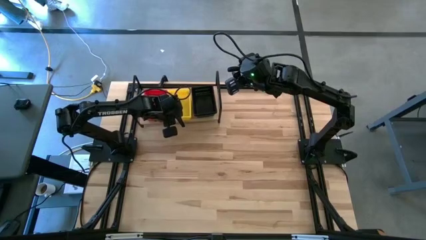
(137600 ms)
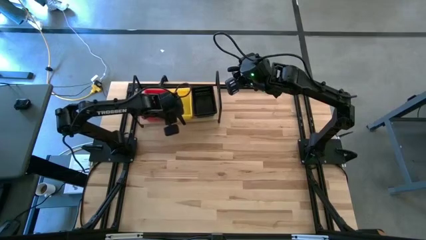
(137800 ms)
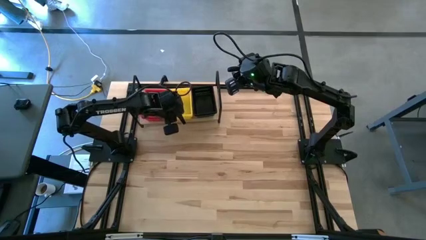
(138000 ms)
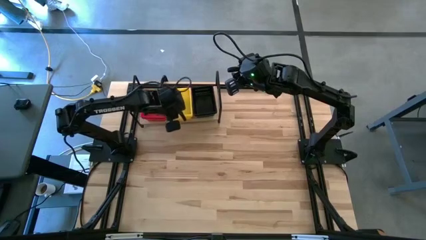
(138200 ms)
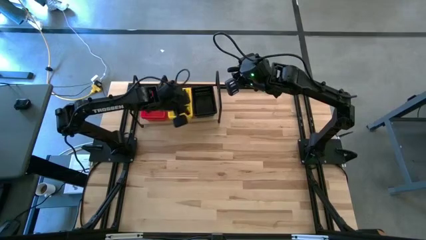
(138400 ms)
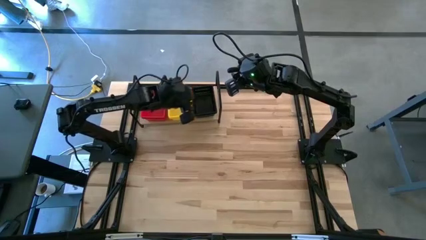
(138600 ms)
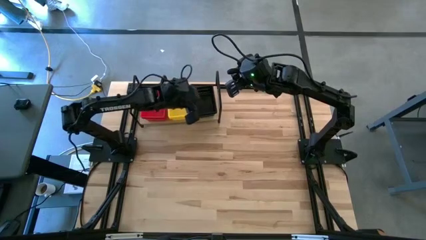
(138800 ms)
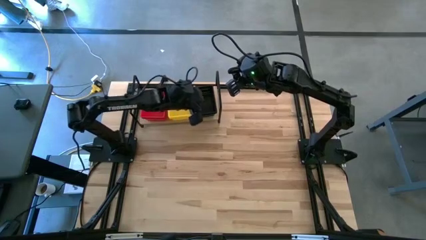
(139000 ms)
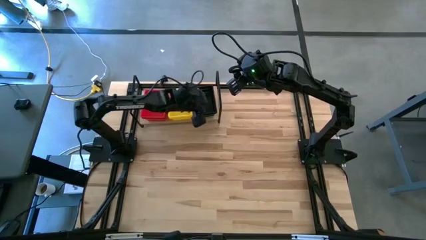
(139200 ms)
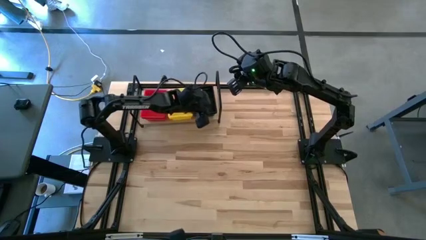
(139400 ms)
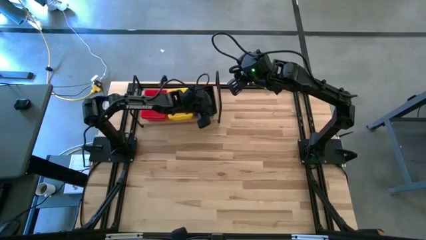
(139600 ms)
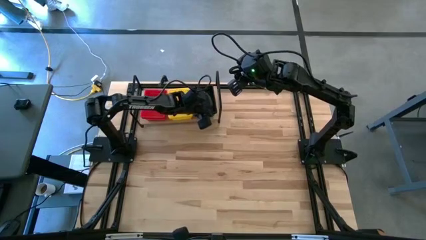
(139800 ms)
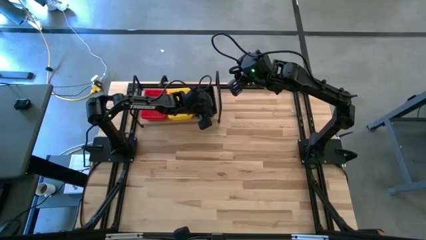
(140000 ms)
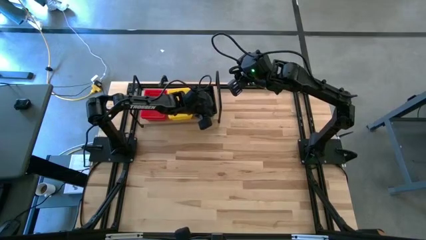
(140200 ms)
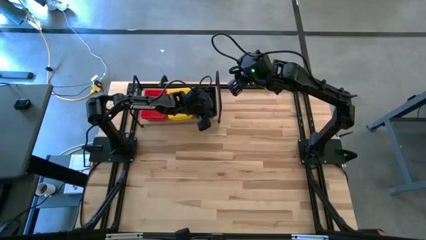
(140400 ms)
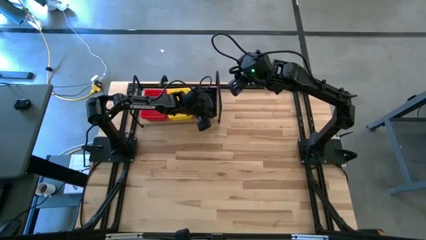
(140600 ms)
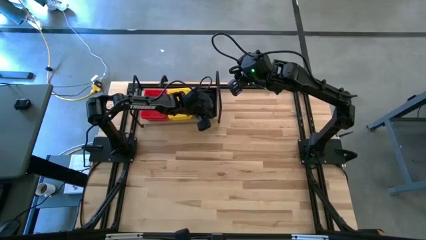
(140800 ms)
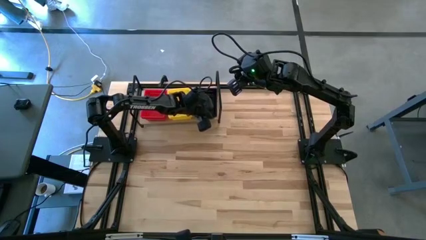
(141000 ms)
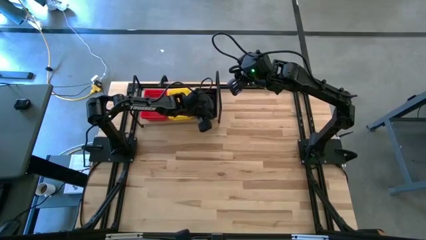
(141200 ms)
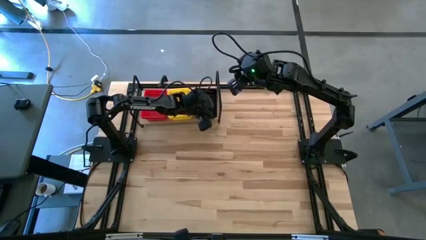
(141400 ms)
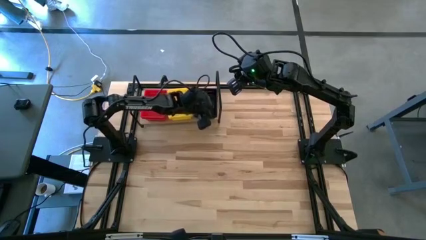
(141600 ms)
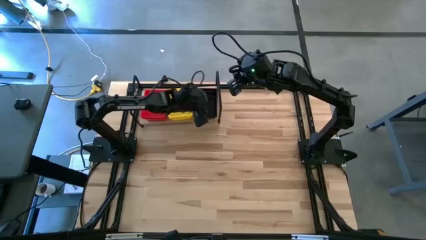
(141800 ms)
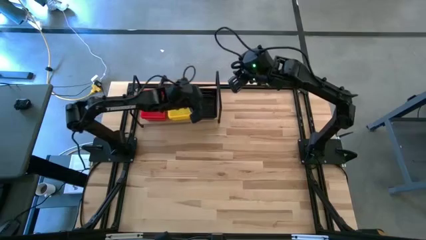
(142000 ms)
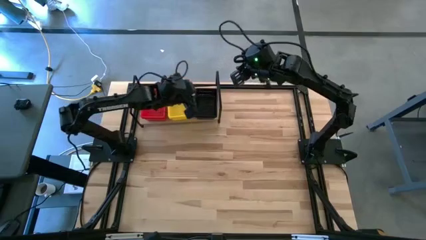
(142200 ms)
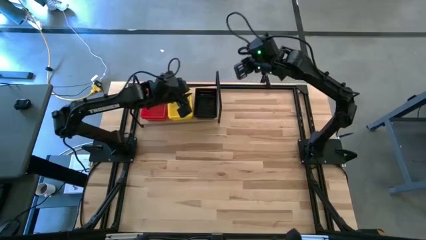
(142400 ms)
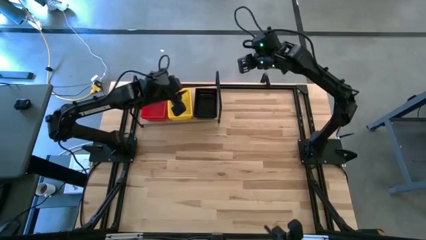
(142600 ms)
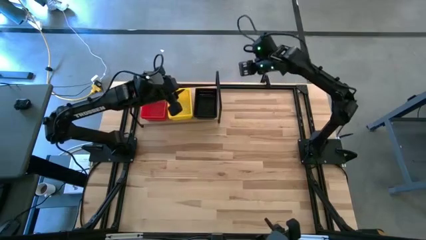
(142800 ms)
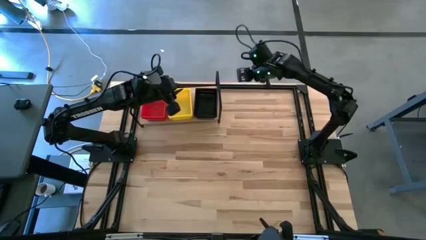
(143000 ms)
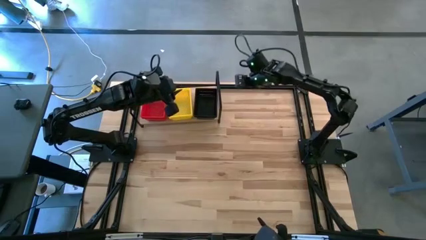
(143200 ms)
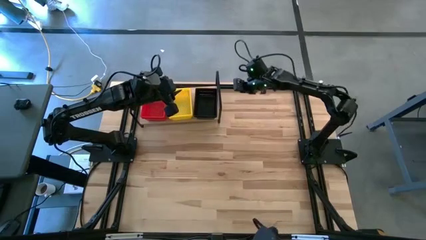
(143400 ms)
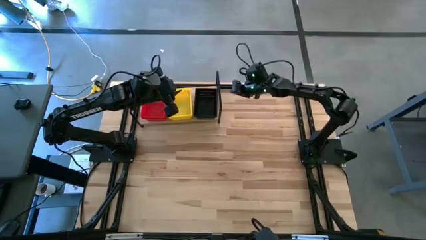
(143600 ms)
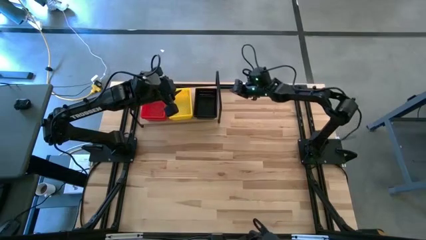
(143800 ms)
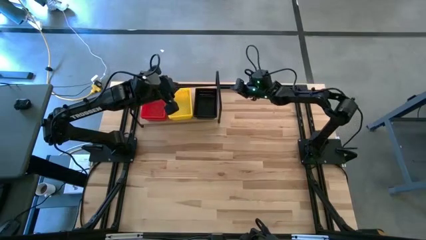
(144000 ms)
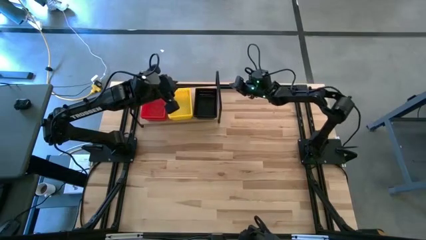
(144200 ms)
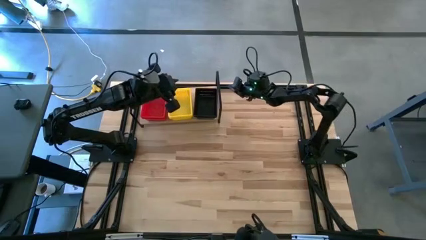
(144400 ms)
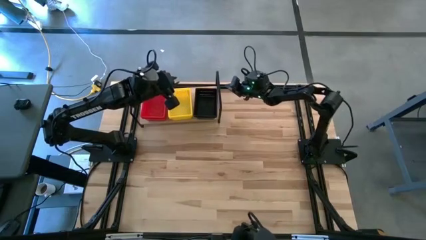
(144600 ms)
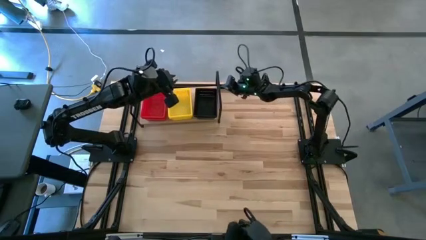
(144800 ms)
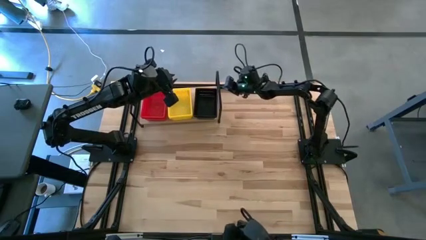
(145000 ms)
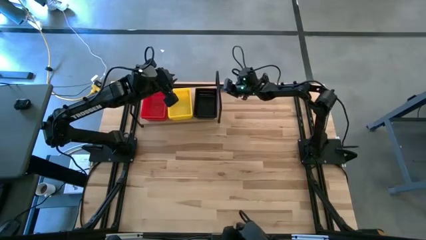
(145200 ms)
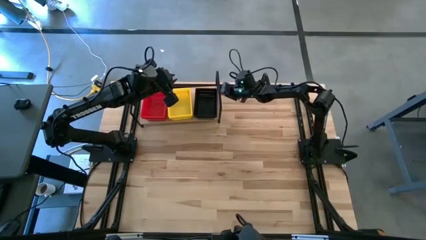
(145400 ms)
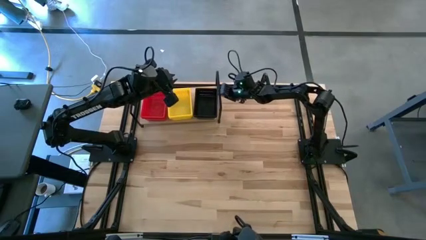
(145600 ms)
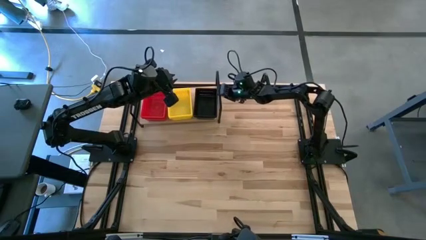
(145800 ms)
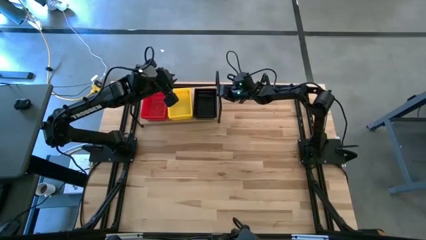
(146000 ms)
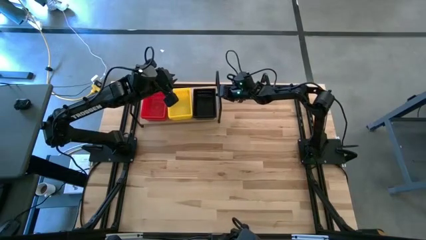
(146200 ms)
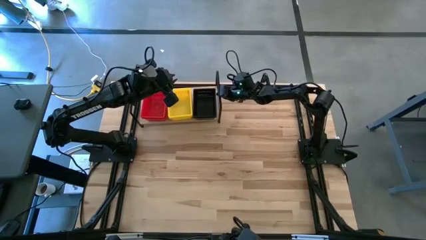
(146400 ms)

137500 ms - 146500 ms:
Task: Stack baskets on shelf by color
Adjust the black bins on the table

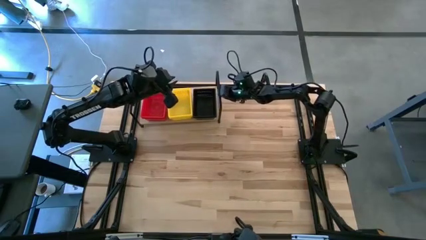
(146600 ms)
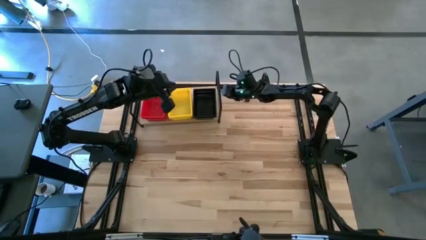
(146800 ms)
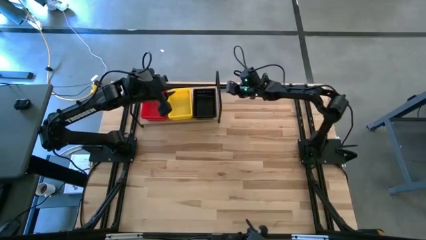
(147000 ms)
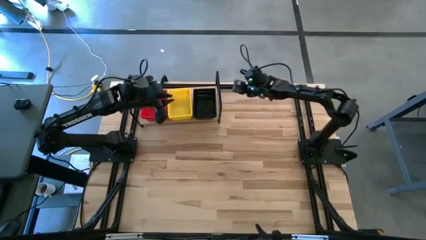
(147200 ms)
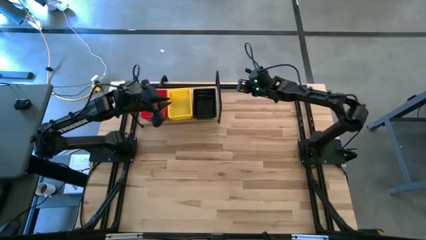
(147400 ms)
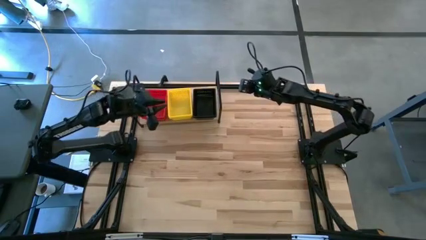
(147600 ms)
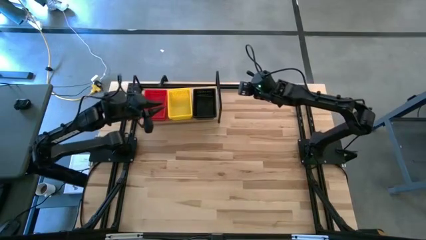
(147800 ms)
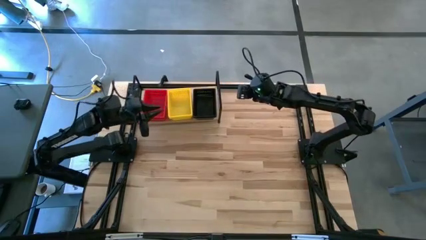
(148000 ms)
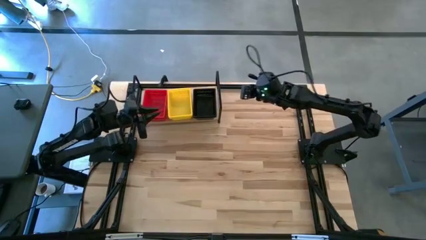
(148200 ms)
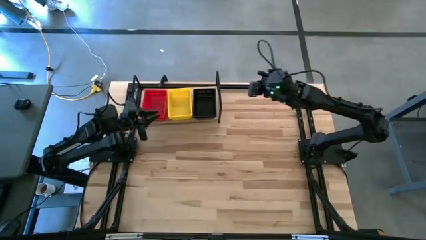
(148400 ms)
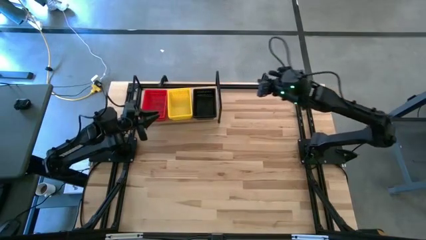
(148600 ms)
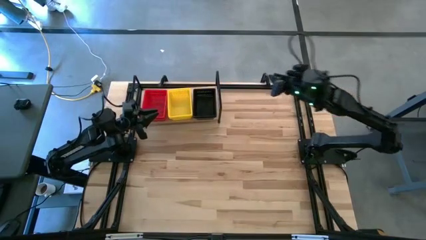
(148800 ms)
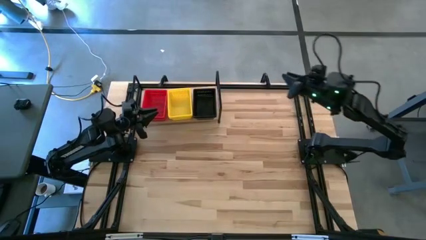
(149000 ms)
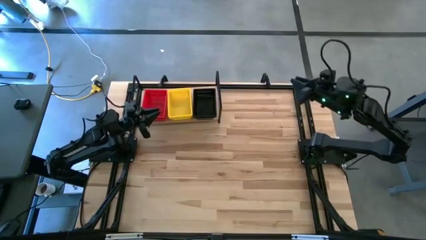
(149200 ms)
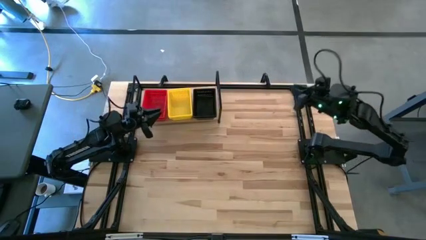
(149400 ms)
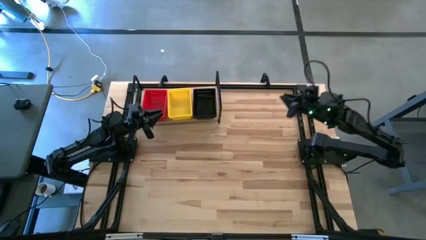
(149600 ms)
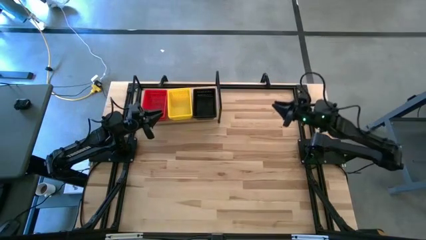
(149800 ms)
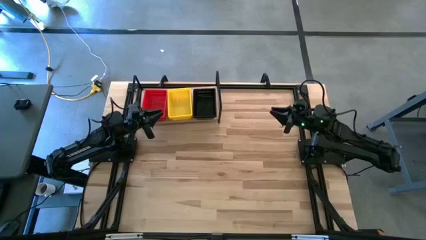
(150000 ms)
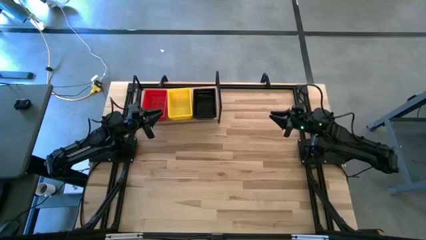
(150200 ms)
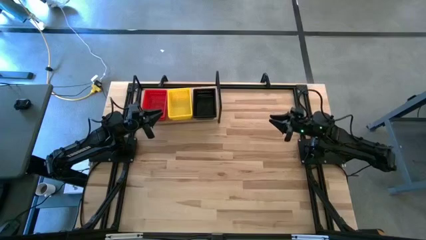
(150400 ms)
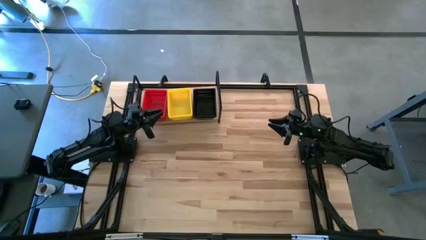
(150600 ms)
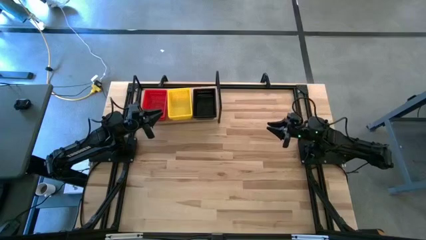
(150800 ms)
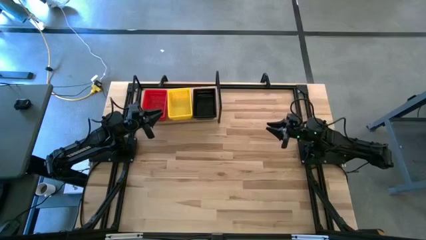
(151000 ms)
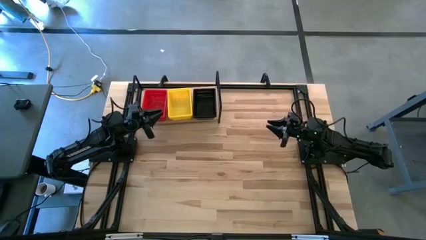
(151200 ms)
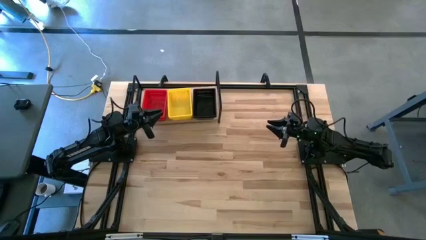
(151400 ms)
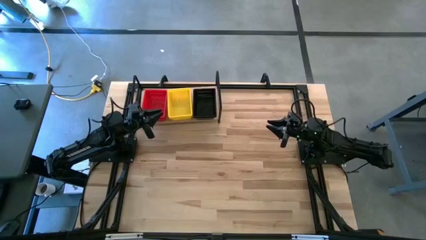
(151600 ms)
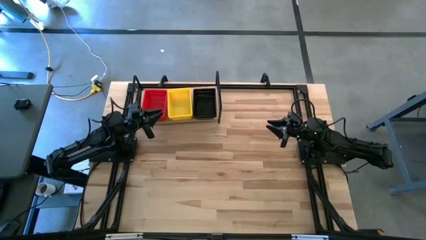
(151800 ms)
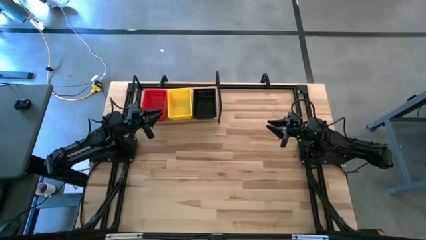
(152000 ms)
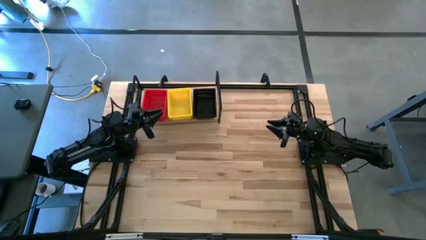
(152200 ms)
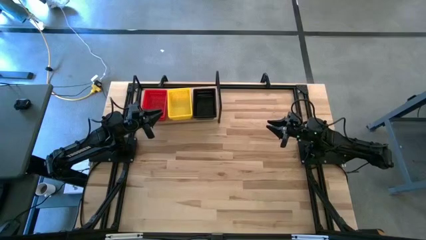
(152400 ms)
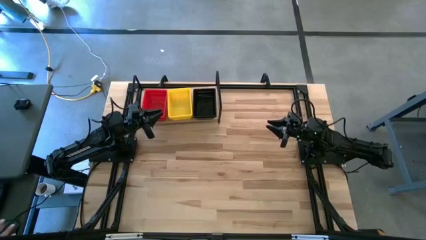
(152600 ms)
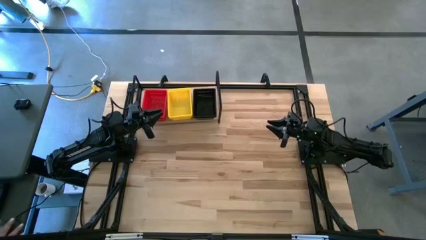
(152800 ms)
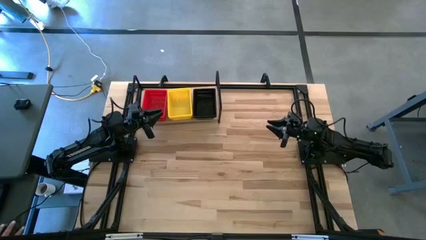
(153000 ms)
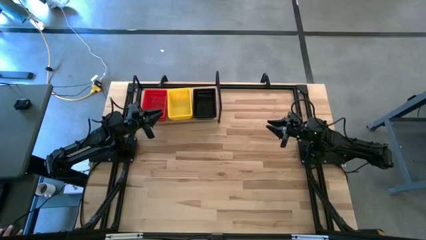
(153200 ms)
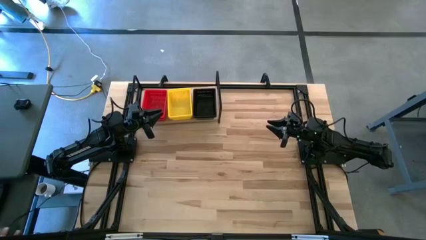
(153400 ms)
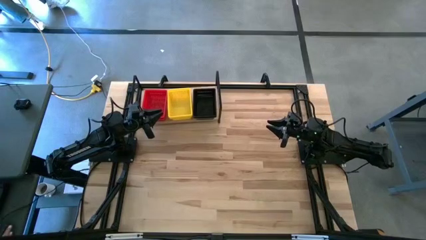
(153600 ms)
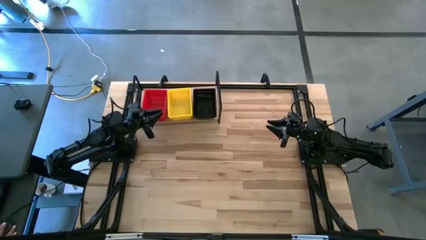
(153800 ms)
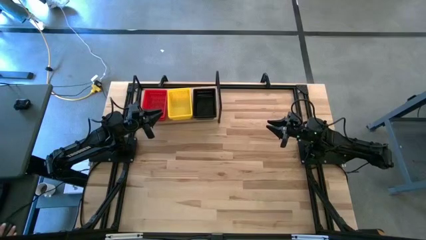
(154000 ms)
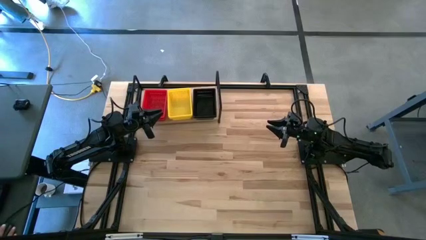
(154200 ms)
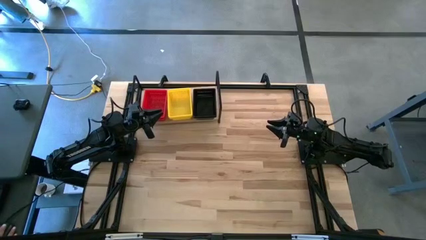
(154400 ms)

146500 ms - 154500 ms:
Return to Home Position

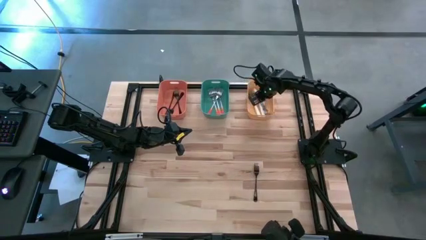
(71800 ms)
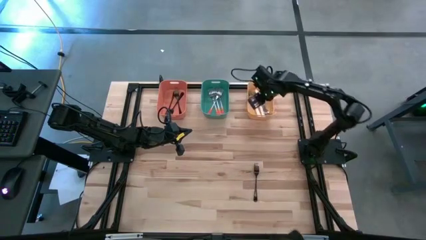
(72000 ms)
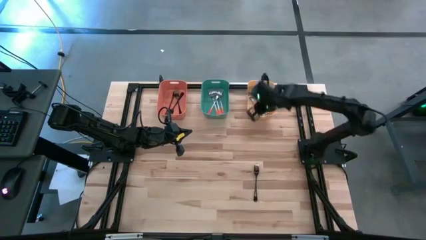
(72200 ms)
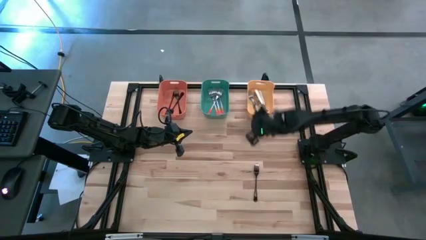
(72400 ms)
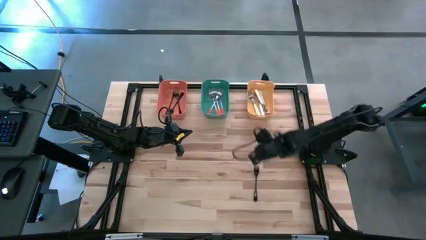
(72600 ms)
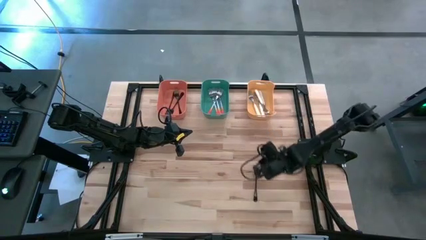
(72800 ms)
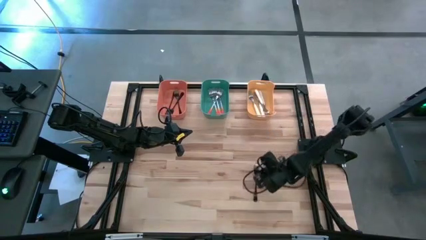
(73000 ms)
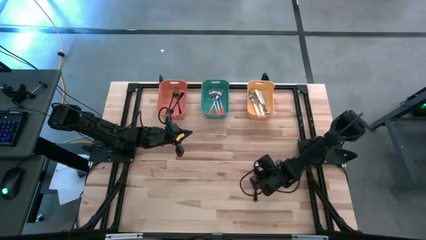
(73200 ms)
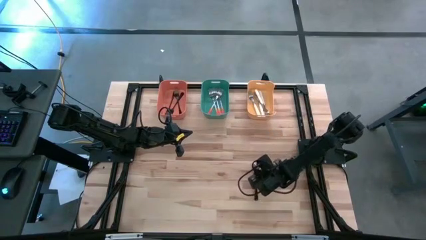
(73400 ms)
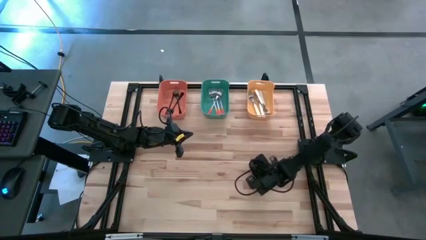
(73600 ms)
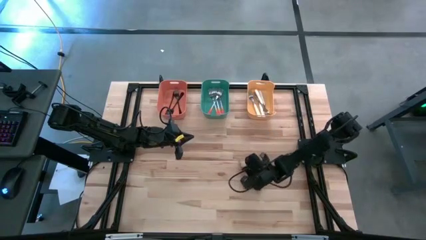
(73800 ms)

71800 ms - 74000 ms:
Task: Sort silverware by color (type)
Put the black fork into the orange bin
